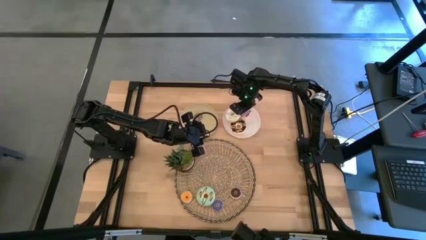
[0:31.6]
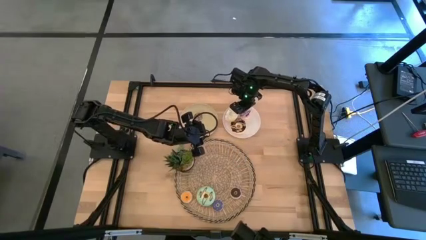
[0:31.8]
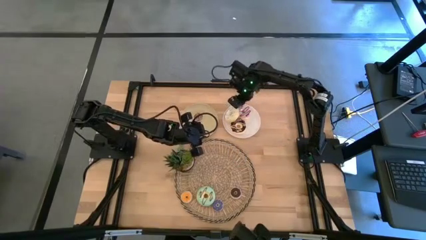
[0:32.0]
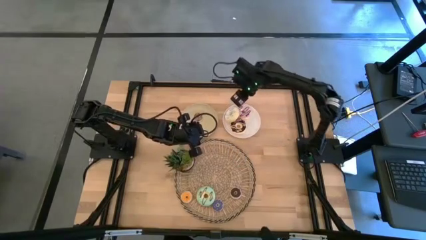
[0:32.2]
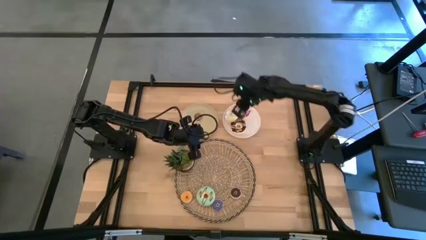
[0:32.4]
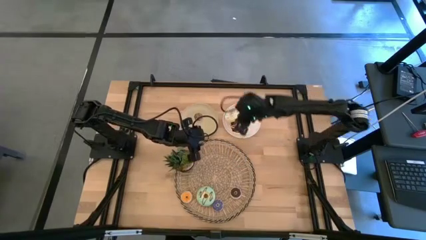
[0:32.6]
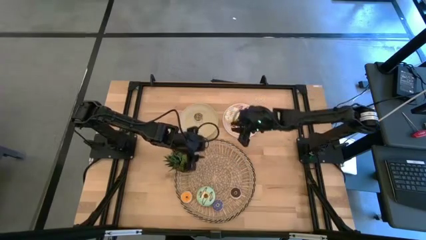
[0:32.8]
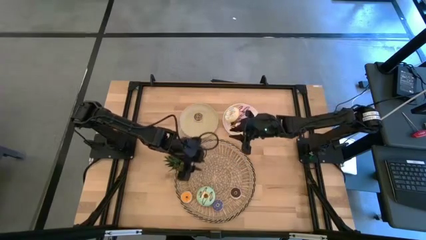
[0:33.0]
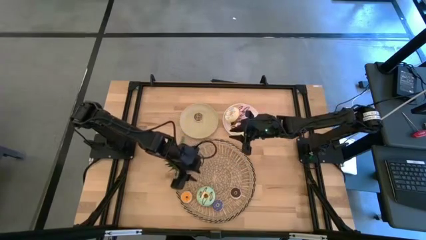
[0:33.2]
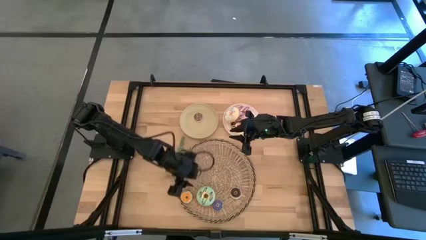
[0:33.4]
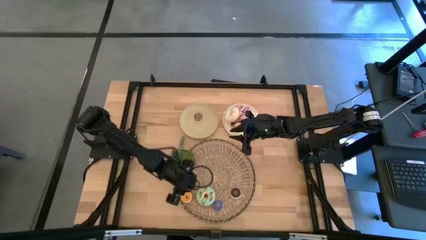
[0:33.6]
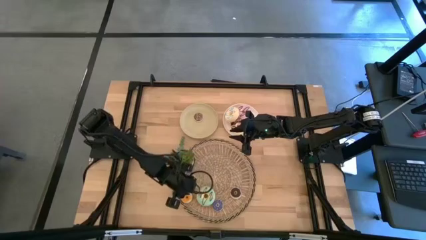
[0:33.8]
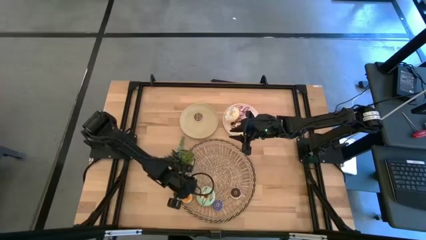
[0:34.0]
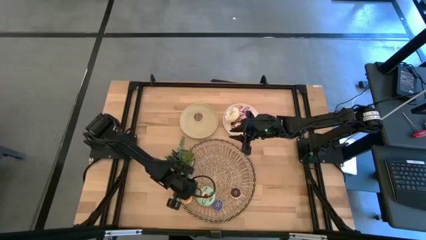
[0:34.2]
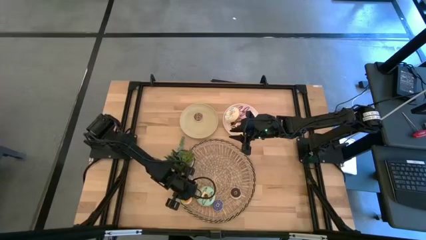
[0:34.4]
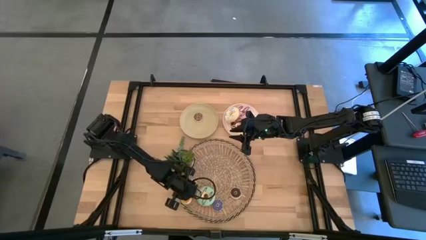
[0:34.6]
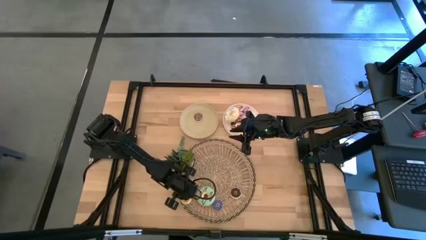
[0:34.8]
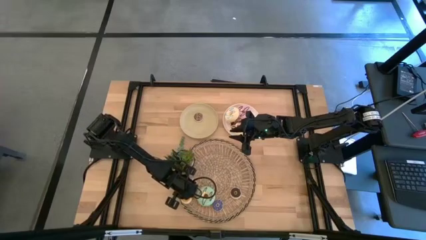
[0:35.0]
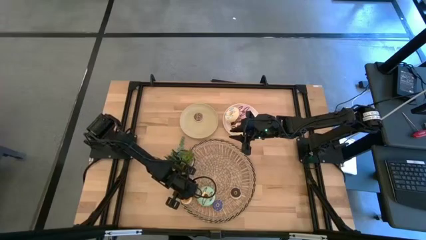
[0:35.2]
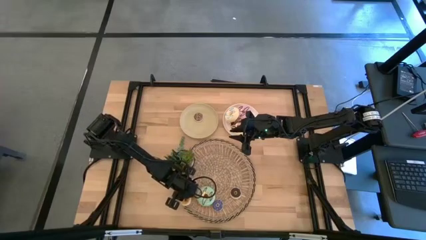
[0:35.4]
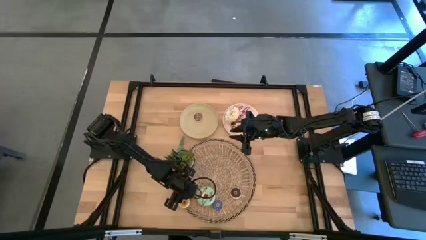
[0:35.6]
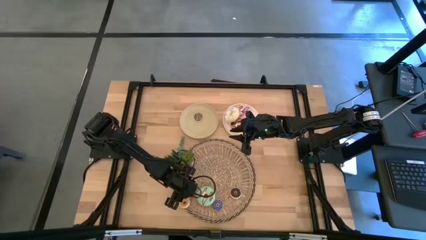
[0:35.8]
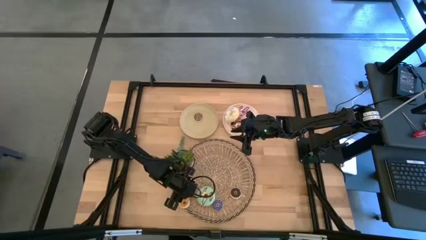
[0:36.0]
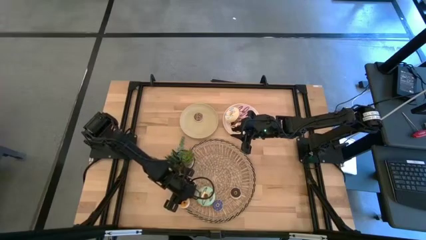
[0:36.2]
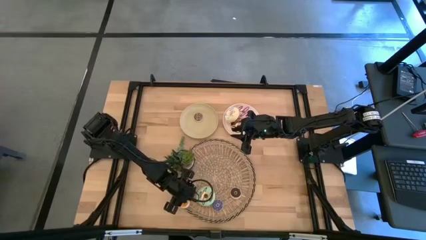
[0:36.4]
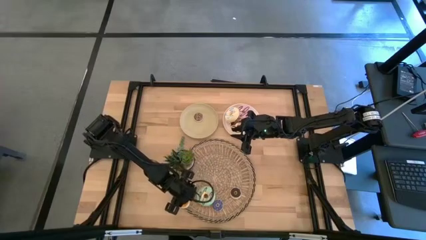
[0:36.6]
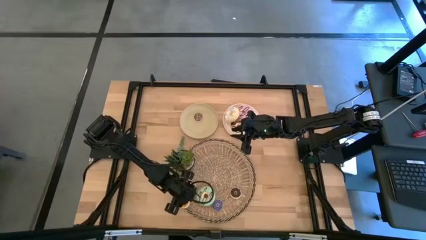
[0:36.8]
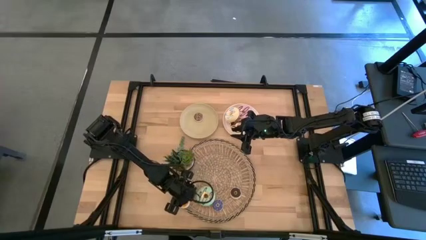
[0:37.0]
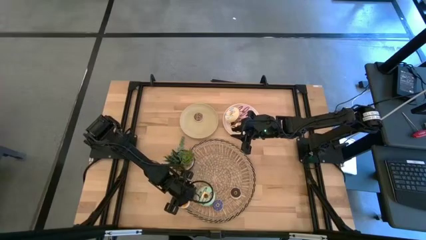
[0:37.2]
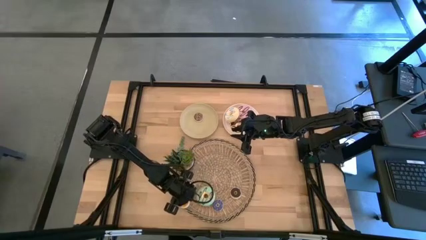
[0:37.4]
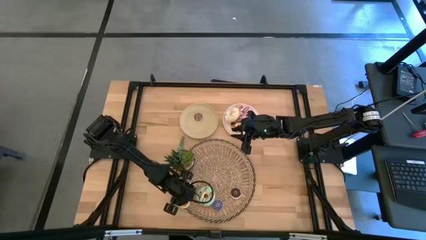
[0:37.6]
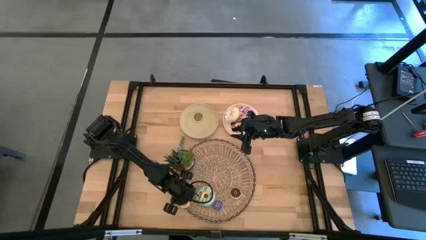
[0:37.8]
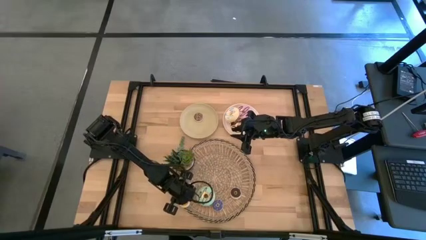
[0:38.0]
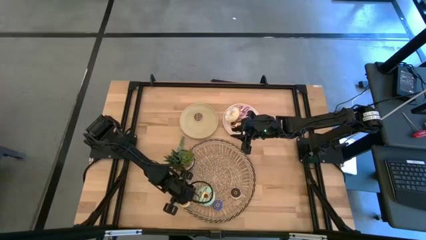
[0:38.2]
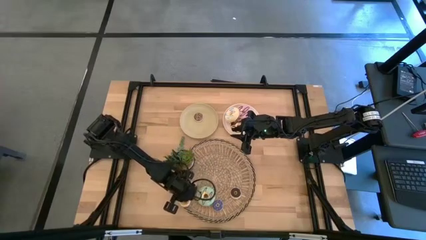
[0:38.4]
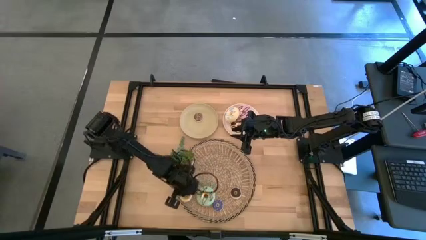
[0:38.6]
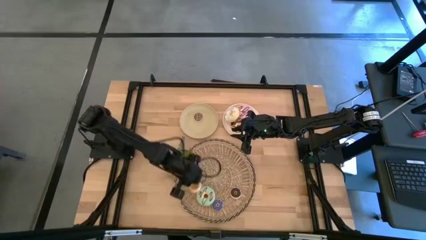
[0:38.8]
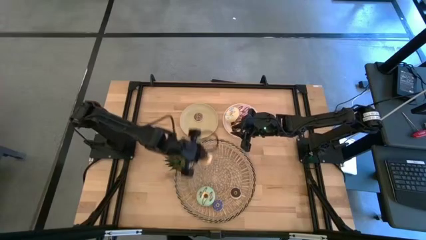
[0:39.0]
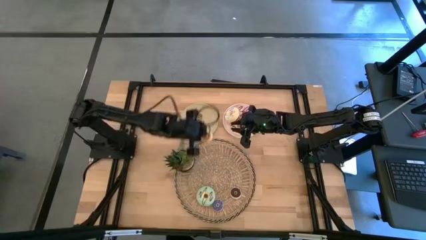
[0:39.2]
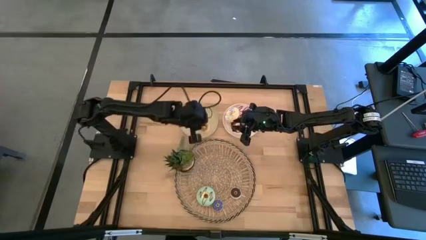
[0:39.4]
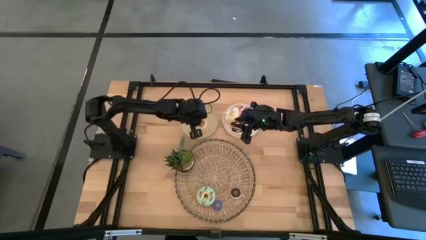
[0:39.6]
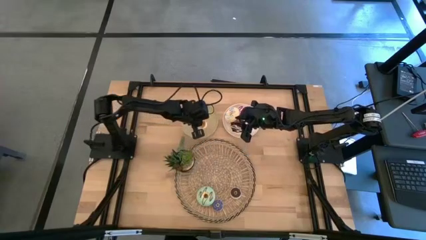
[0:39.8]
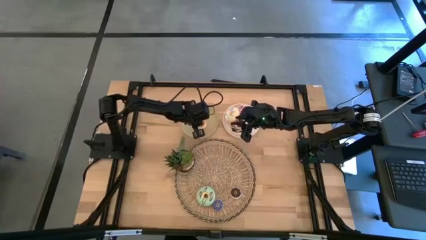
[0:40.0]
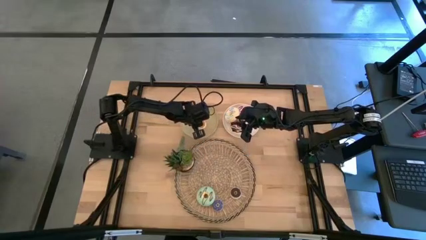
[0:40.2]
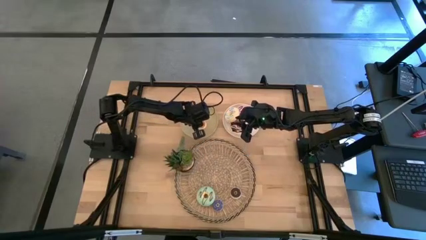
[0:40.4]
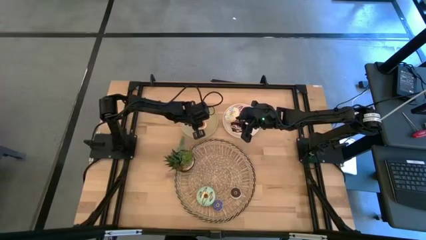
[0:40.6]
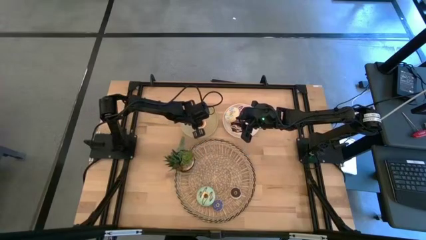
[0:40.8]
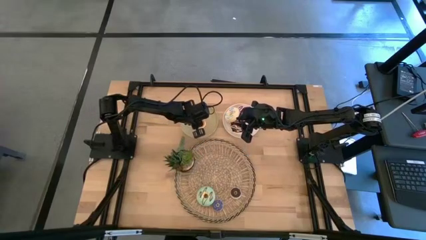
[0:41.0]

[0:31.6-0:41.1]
Task: Pick & Place donuts
Put the small yellow donut on the brown plate

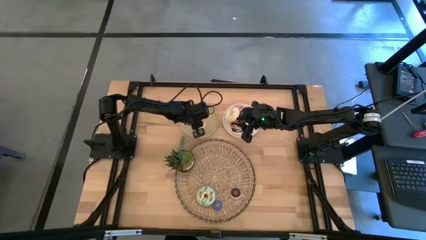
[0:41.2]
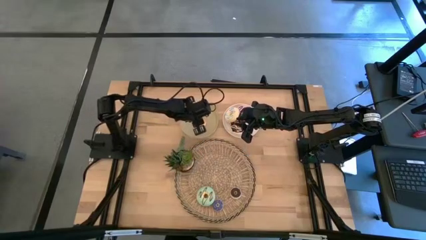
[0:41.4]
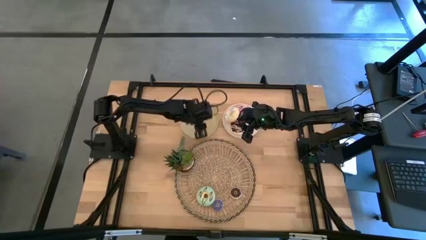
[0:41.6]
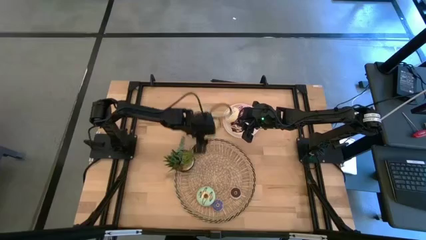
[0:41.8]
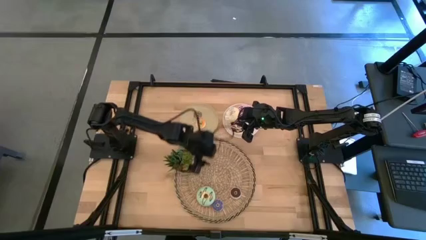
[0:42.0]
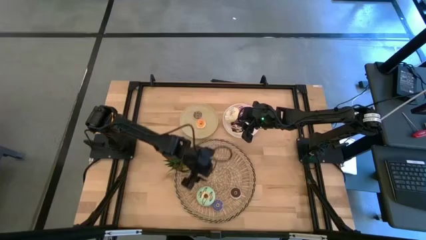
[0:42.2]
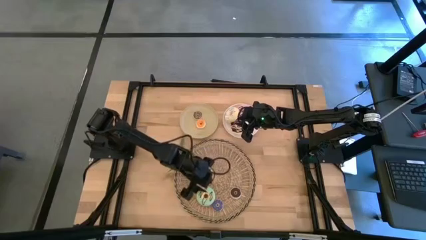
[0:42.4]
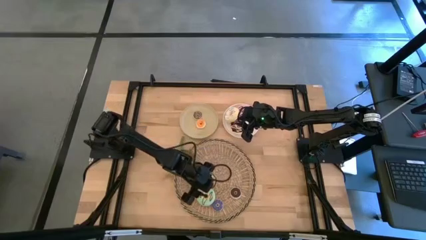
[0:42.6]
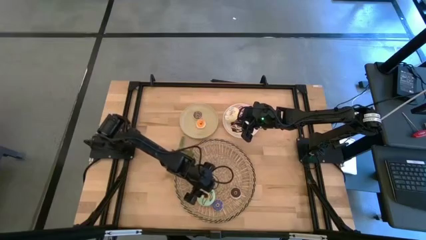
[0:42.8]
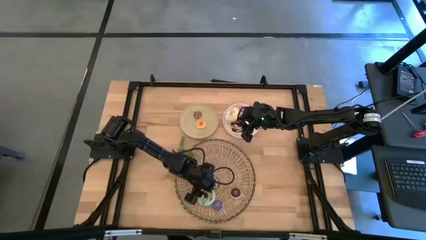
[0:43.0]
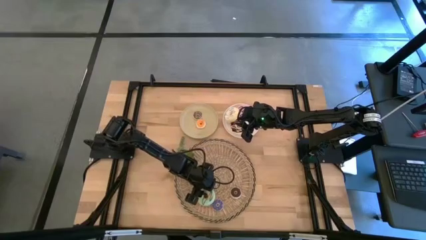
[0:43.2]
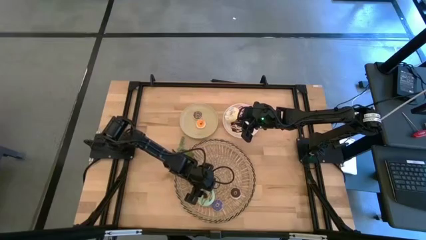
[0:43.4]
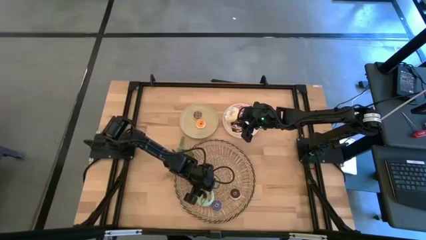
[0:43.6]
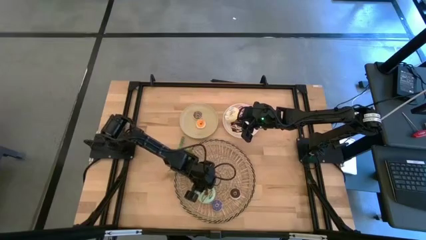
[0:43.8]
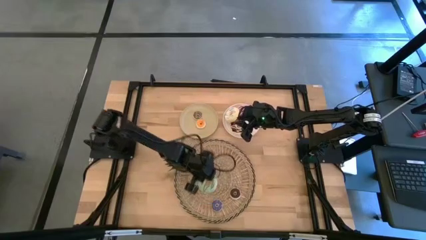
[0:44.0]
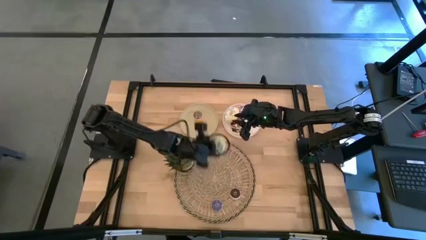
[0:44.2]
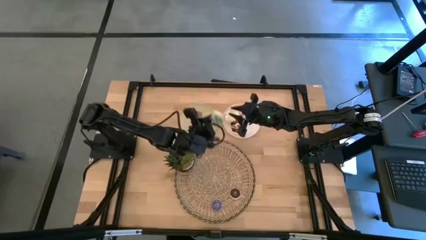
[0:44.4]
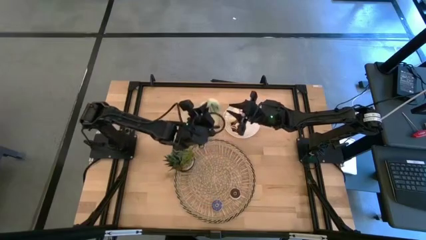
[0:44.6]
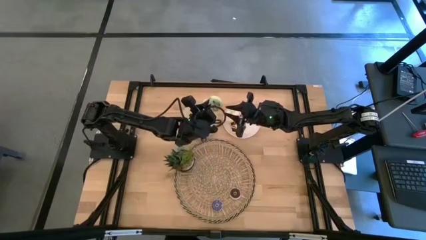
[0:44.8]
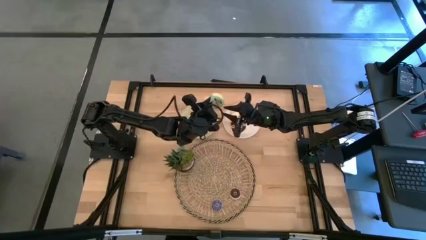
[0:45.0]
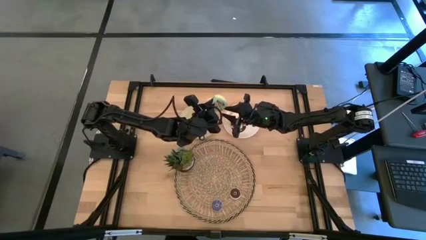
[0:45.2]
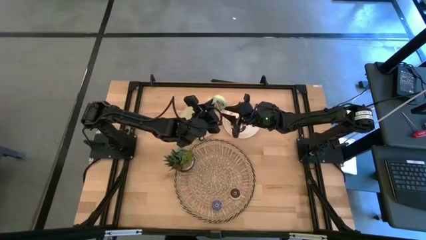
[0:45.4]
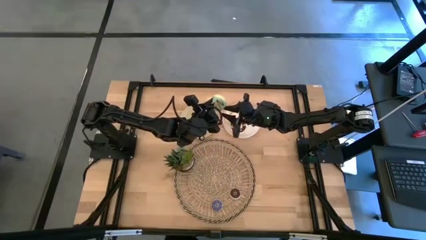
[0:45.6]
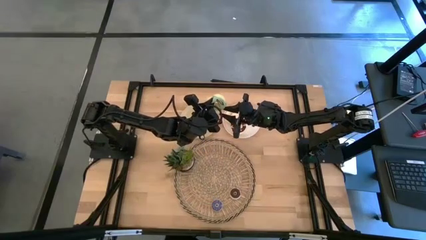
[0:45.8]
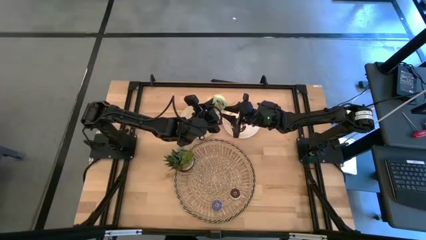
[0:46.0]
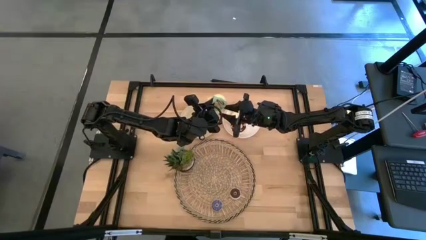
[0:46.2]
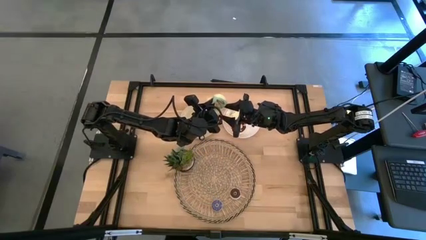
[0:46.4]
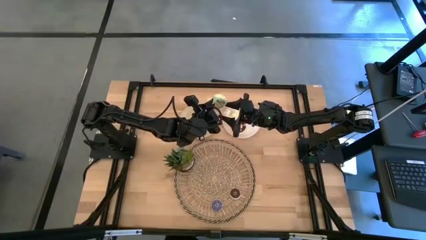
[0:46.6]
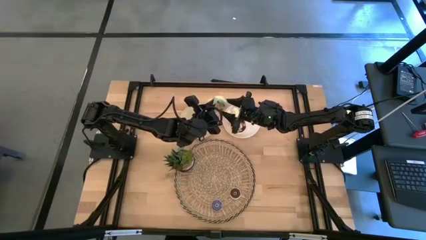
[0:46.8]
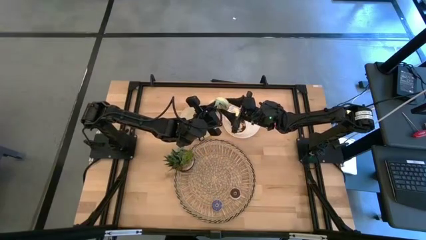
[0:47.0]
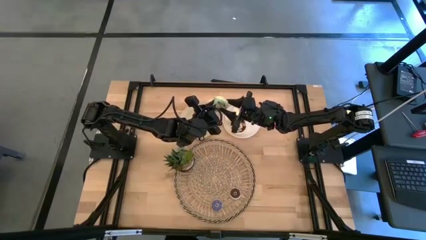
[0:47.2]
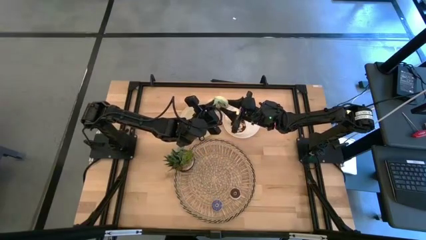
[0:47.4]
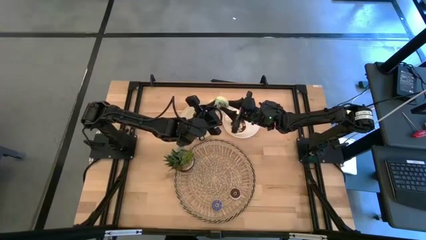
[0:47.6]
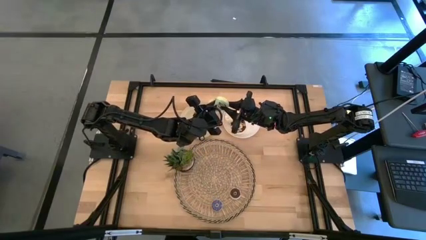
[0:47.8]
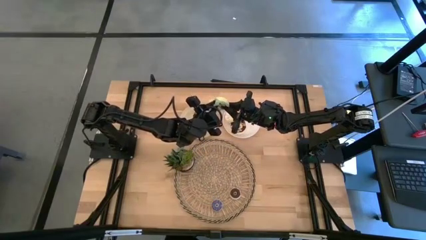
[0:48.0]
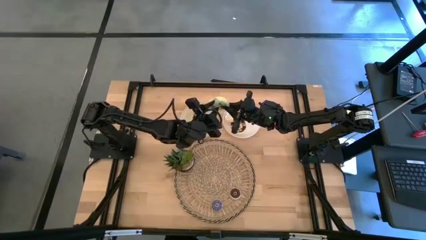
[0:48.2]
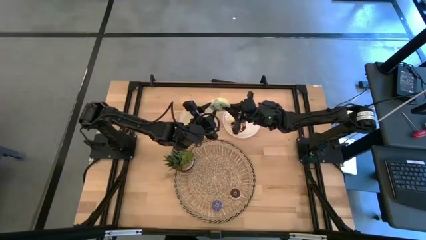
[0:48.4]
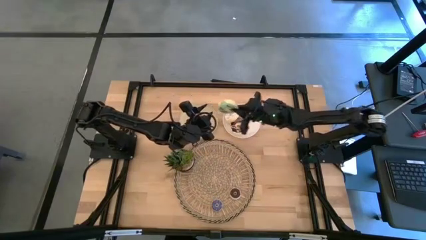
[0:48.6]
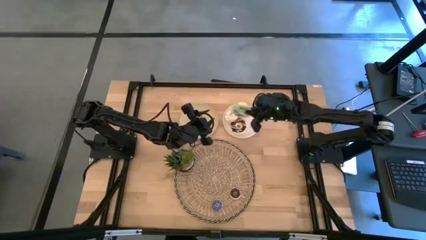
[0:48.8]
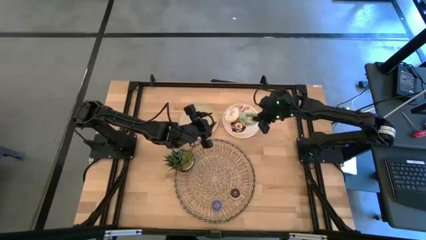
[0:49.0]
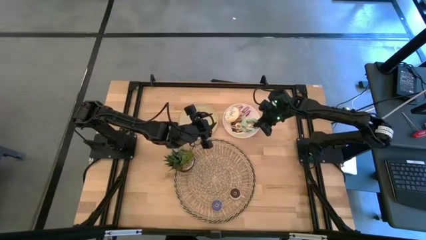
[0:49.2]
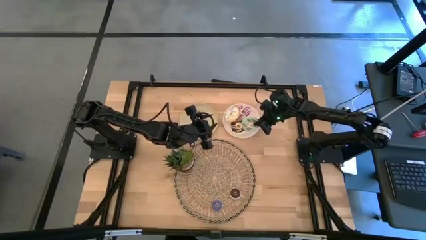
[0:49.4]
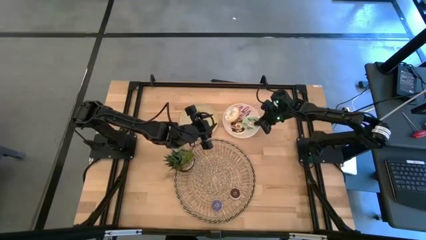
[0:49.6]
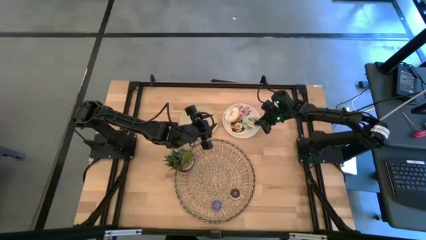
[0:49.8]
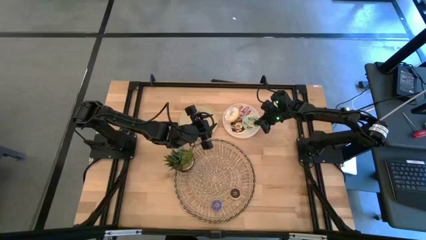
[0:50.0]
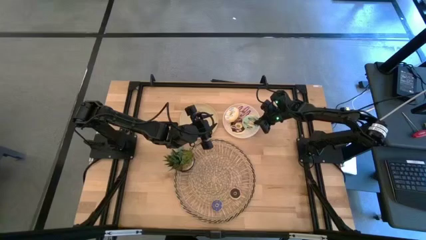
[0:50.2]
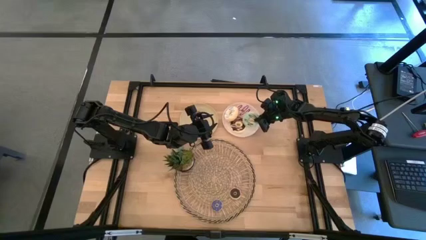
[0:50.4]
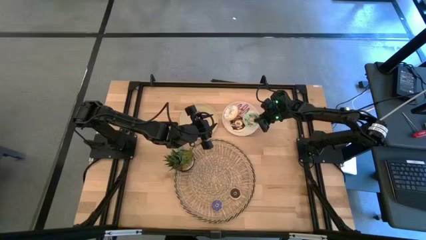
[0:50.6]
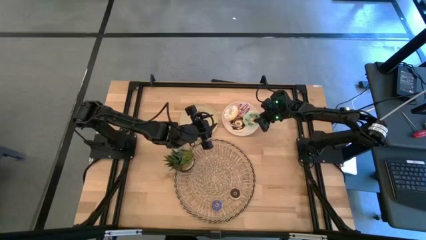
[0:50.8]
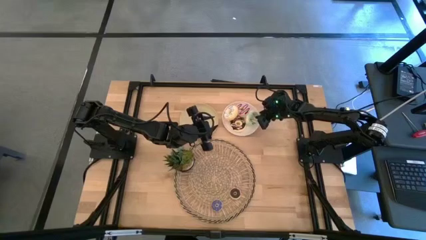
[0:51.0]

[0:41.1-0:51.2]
Put the large light blue donut on the white plate
